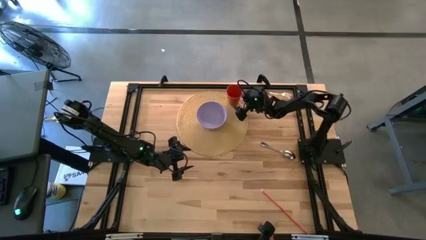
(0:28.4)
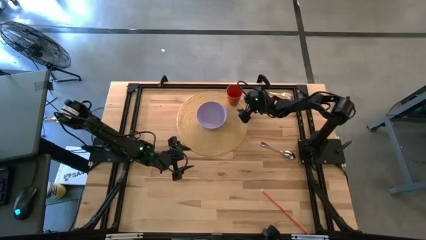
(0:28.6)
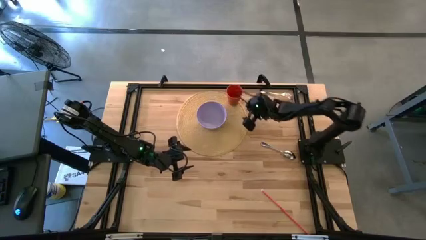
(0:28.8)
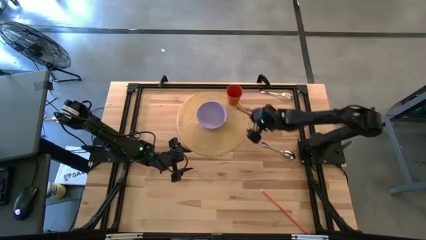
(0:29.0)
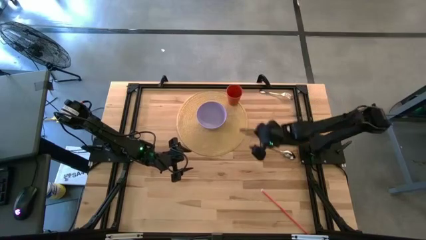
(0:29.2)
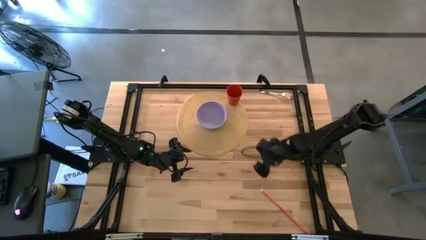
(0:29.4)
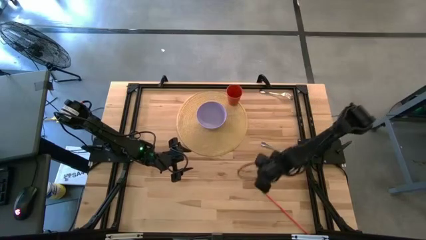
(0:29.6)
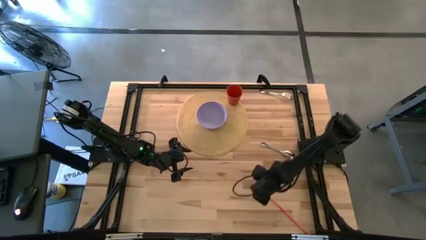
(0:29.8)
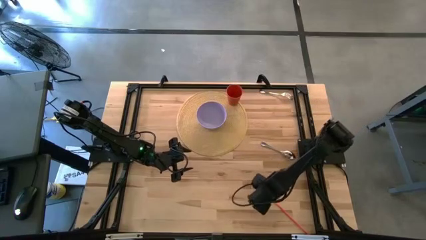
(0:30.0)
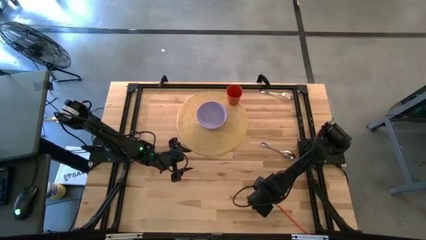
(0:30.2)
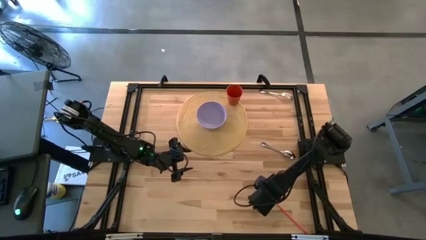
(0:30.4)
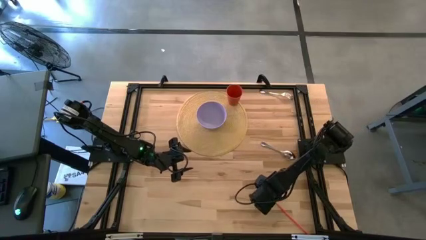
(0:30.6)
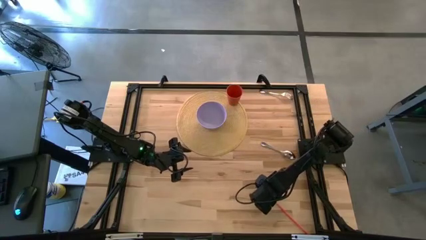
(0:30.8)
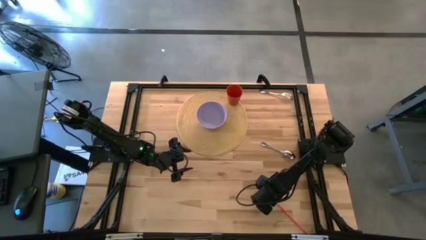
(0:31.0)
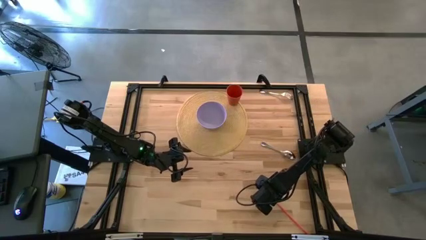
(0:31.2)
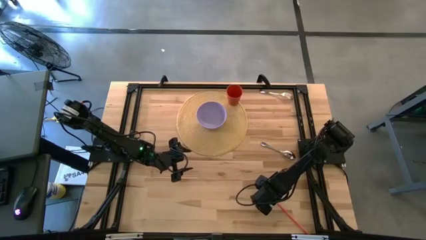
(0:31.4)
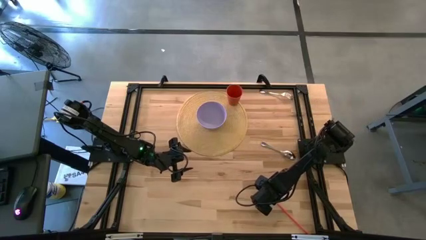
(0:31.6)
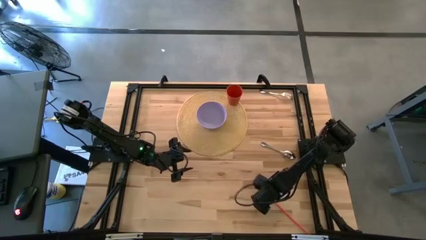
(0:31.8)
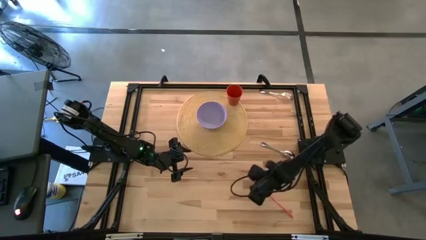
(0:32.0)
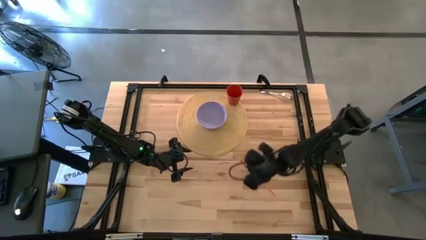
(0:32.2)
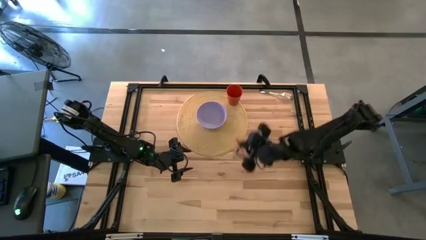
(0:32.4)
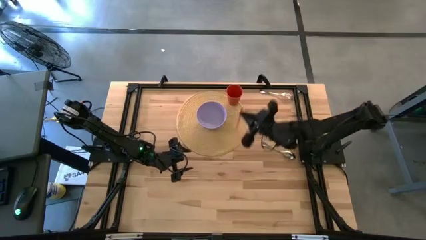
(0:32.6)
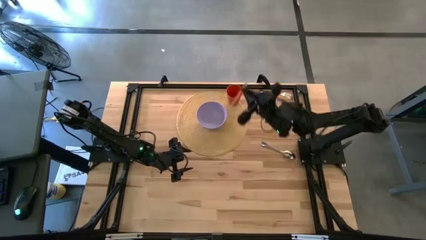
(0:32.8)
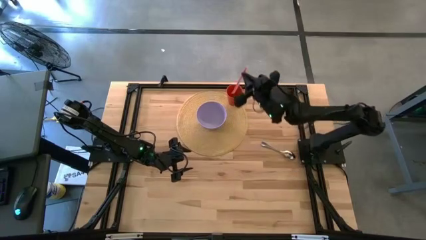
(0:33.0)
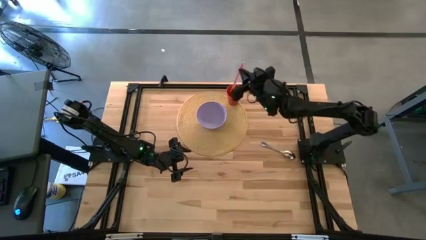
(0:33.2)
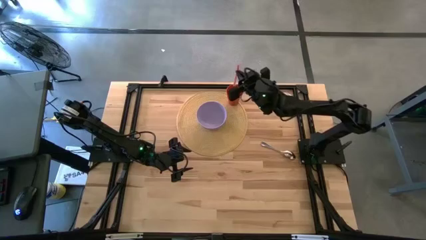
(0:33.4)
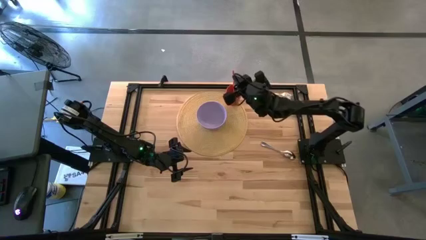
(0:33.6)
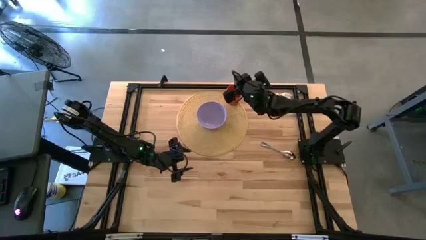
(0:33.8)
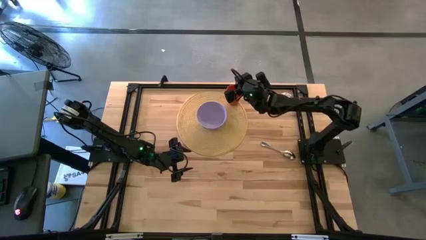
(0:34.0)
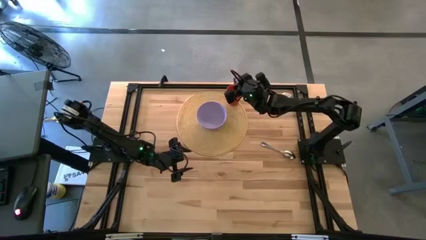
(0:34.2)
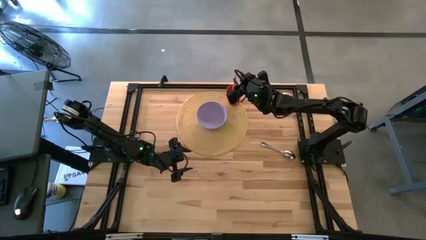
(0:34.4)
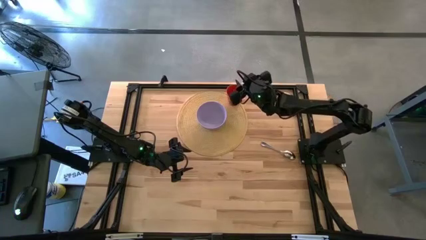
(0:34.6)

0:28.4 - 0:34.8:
Task: Pick & Place Utensil
Put the orange straw into the orange cup

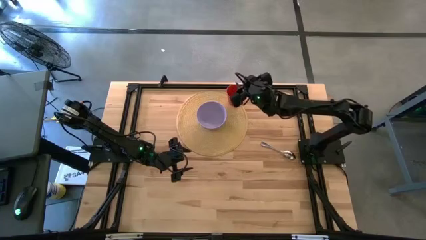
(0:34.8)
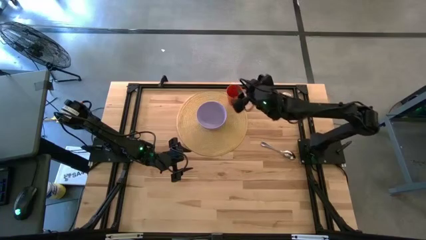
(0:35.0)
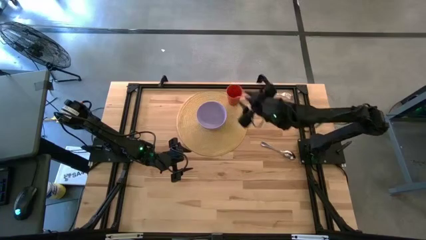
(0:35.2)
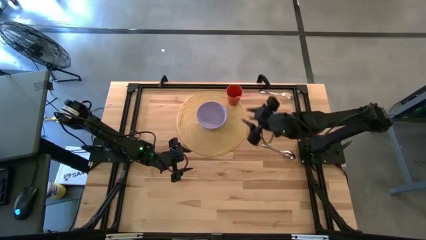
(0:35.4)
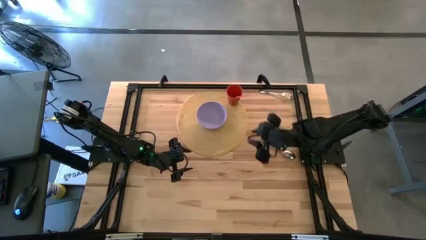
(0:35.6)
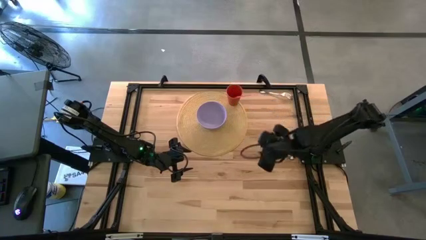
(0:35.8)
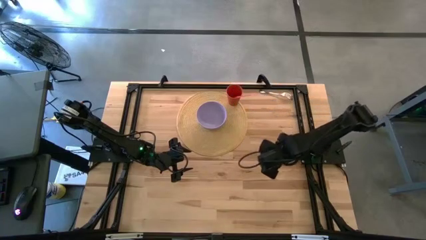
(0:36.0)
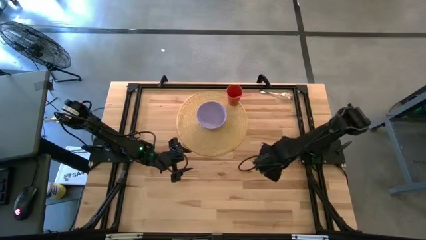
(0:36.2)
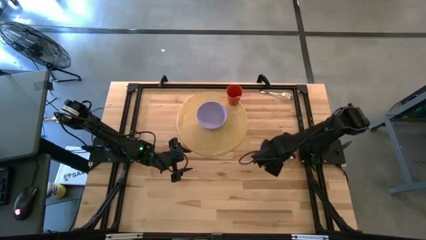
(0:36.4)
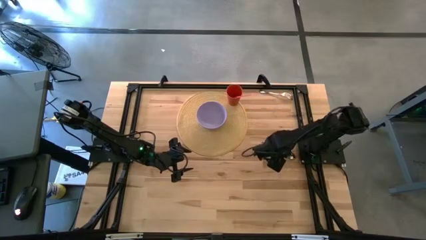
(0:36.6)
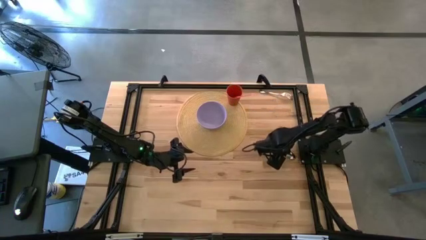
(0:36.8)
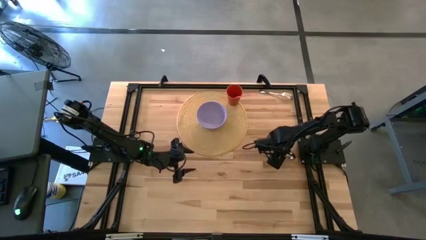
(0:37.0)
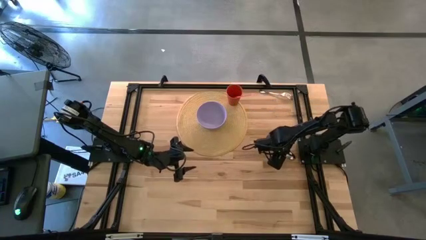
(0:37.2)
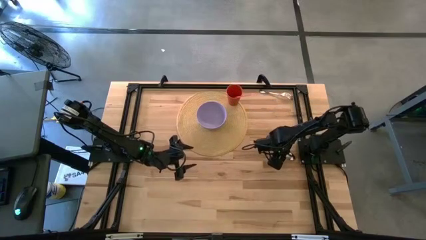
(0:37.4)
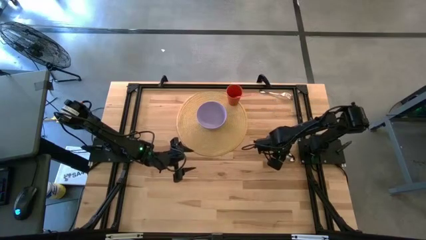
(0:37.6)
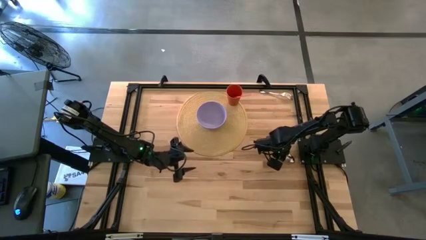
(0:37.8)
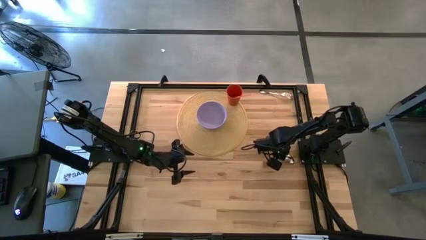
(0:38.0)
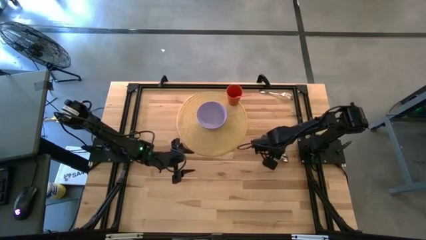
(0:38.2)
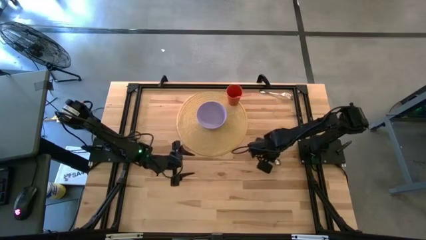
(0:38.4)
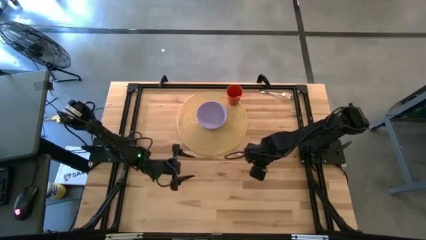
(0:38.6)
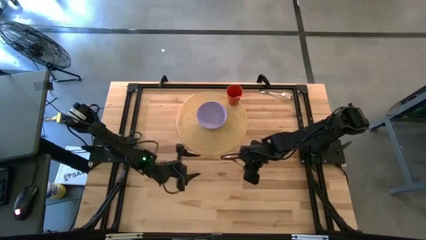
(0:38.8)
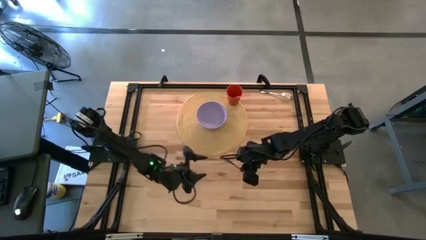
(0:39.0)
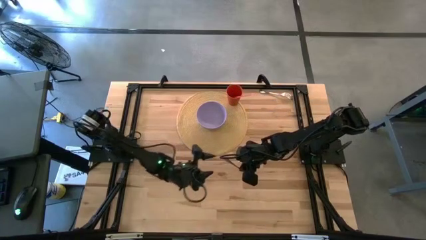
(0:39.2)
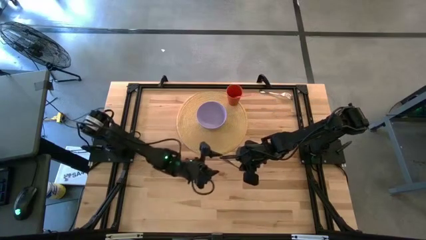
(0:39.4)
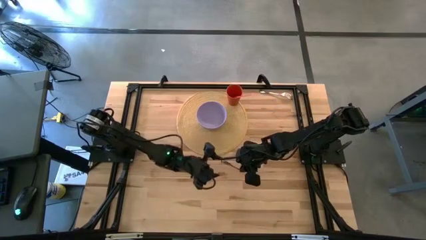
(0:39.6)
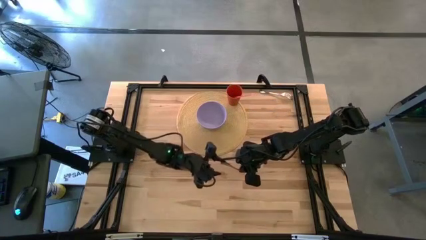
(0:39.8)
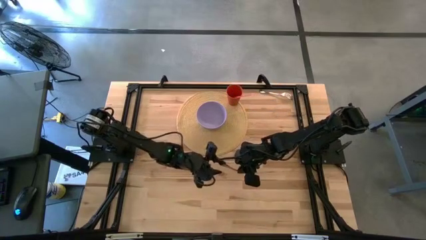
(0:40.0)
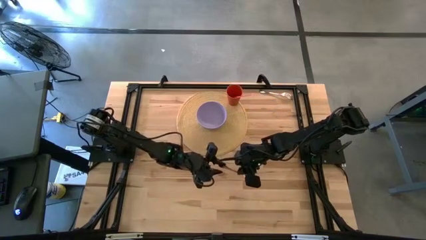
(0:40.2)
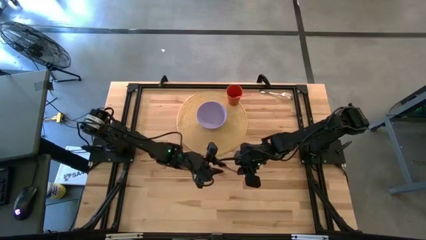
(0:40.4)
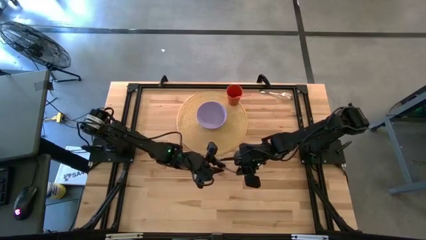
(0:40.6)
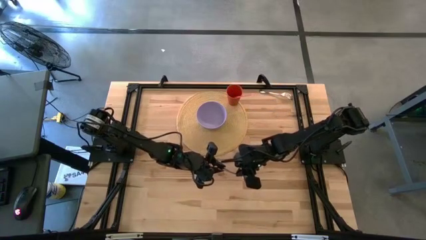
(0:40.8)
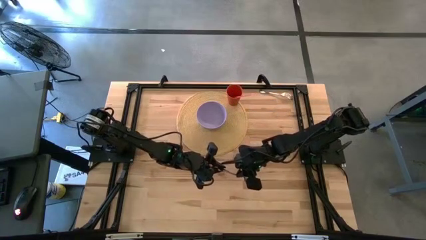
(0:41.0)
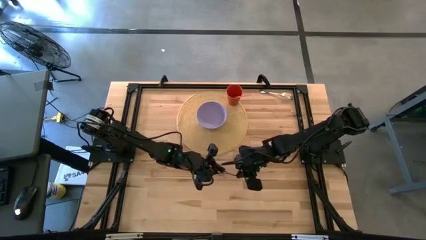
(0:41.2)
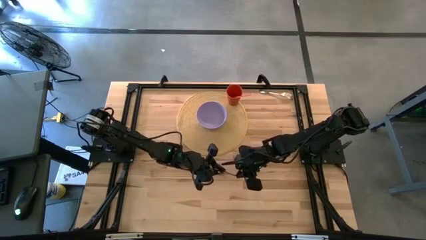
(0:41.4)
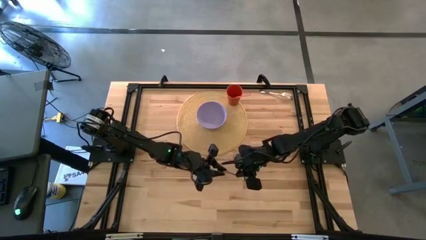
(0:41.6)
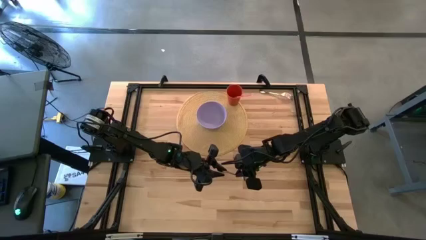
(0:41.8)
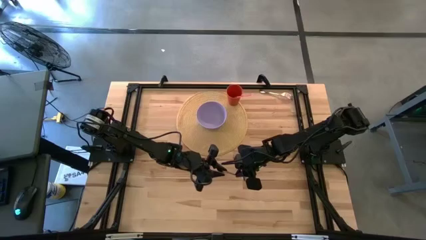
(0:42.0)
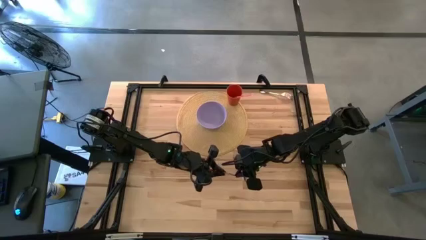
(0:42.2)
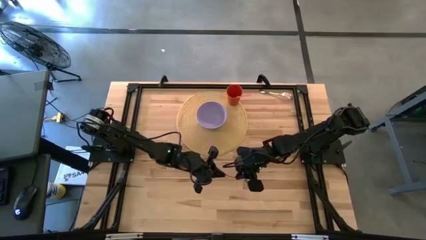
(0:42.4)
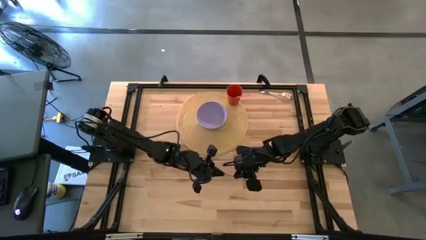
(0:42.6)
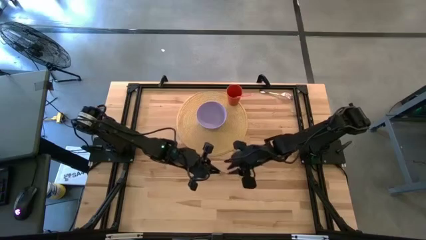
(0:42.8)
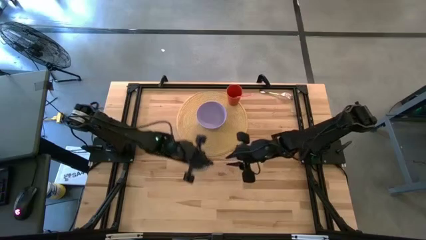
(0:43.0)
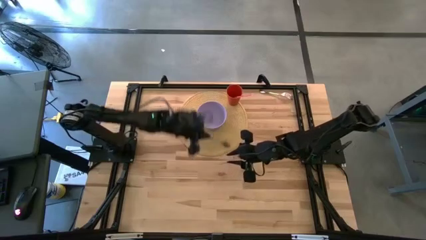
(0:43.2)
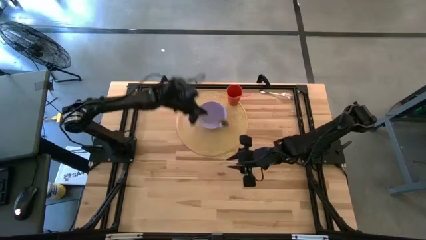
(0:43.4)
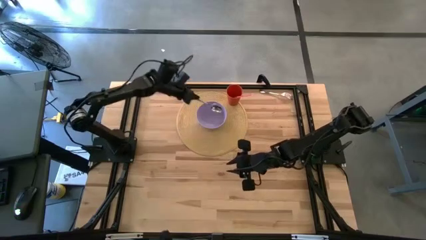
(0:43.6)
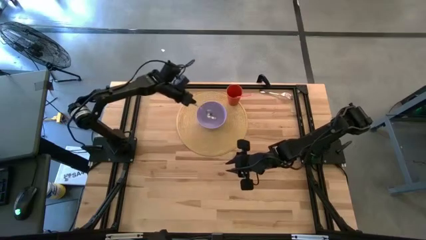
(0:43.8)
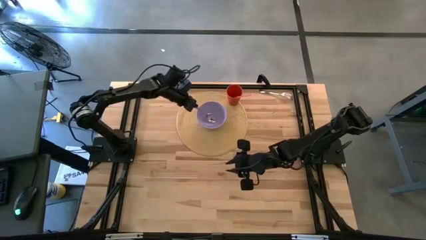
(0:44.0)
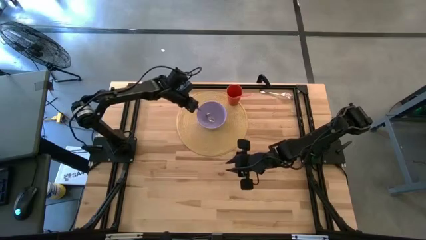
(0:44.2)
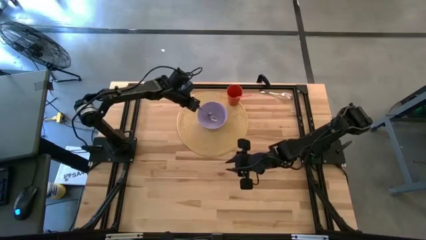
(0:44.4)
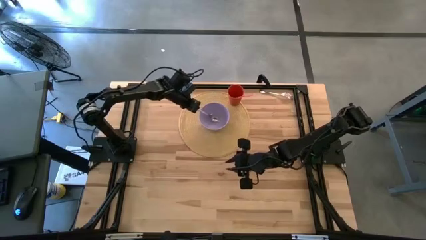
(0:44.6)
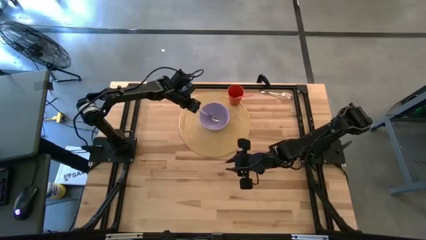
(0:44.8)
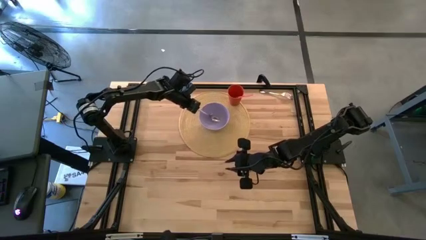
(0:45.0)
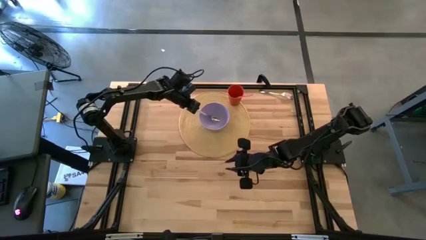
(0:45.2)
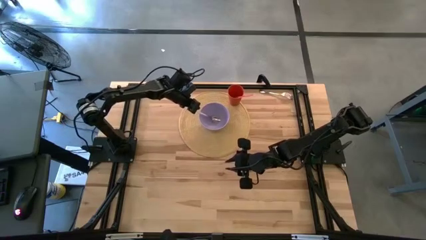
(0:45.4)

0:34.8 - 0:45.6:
Put the silver spoon into the violet bowl
